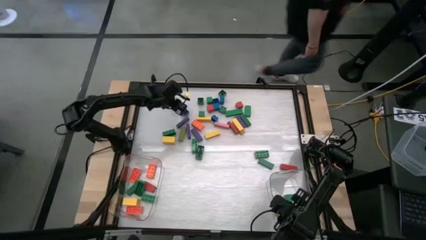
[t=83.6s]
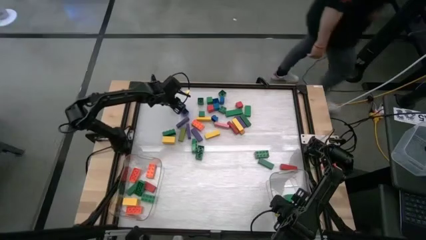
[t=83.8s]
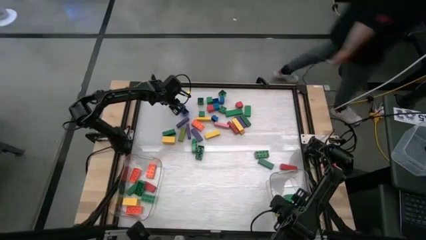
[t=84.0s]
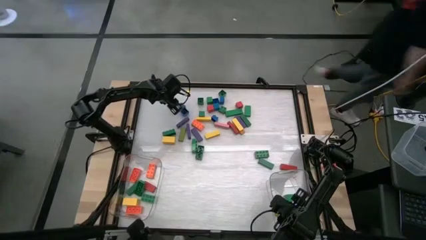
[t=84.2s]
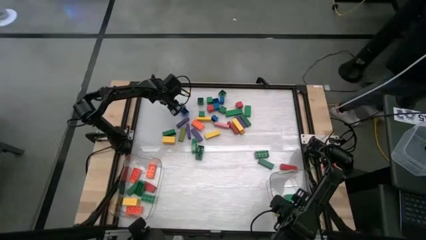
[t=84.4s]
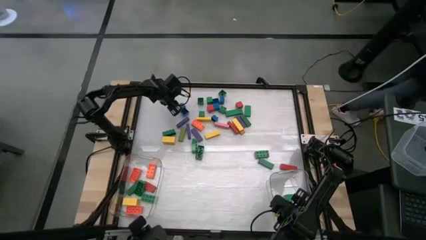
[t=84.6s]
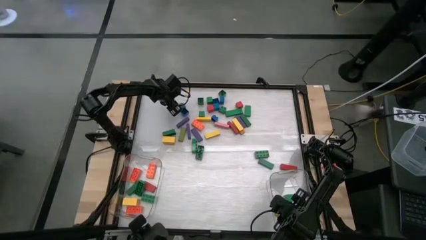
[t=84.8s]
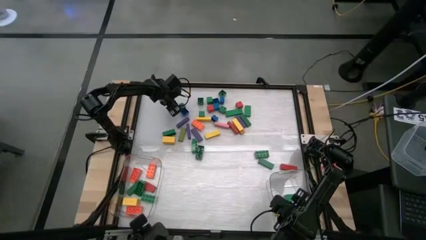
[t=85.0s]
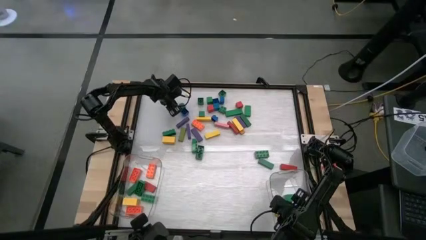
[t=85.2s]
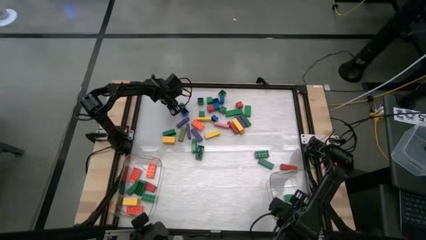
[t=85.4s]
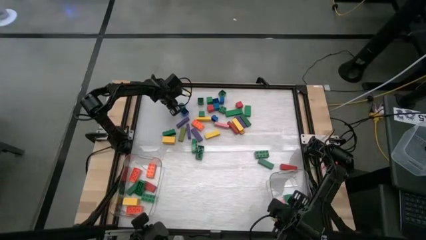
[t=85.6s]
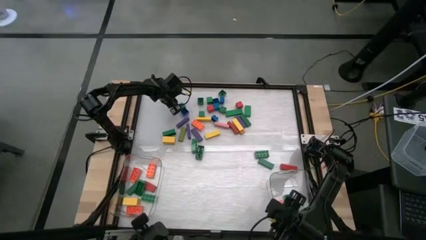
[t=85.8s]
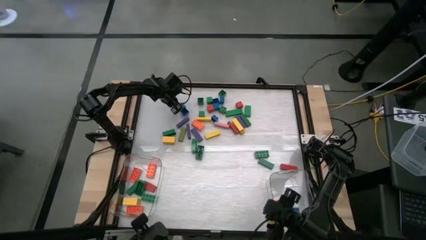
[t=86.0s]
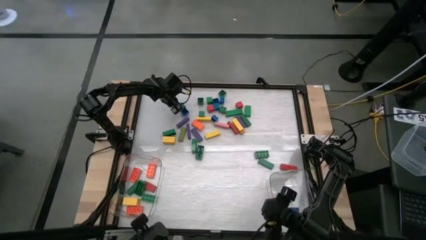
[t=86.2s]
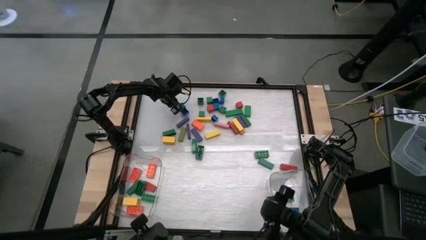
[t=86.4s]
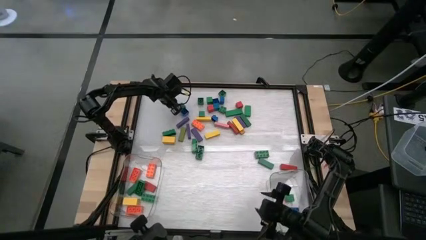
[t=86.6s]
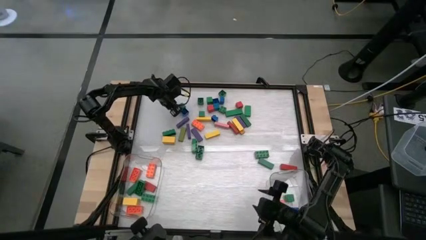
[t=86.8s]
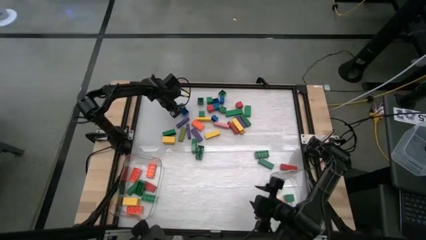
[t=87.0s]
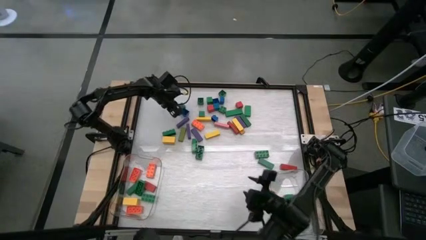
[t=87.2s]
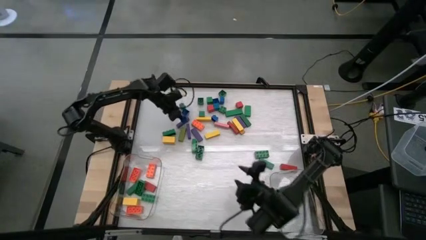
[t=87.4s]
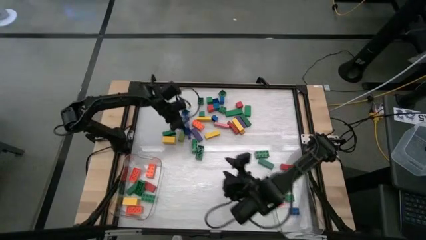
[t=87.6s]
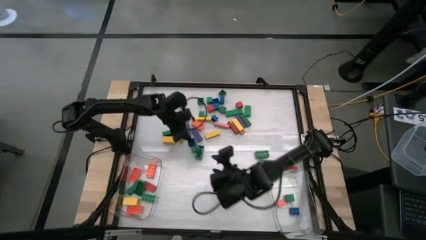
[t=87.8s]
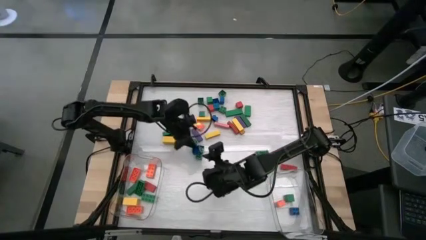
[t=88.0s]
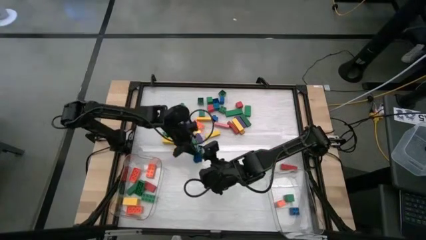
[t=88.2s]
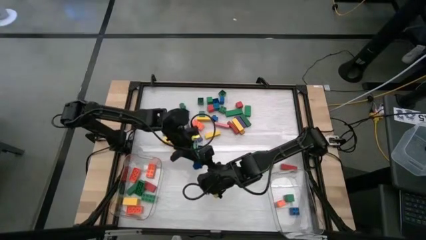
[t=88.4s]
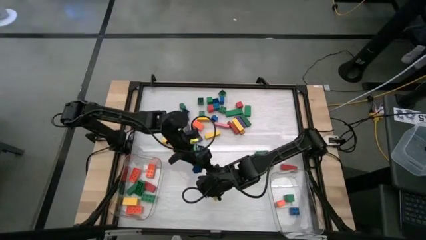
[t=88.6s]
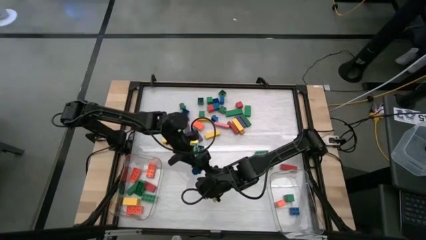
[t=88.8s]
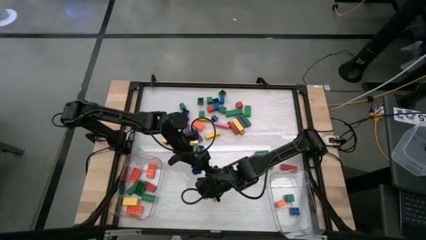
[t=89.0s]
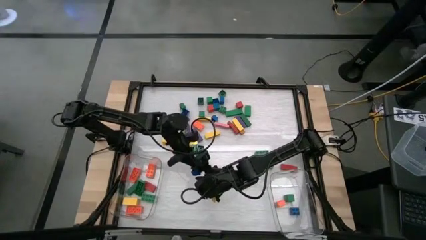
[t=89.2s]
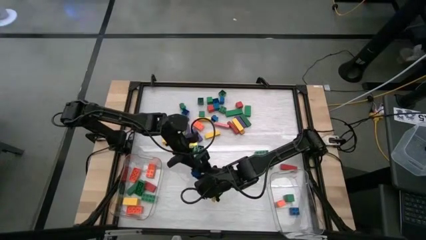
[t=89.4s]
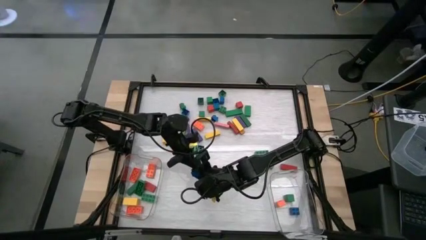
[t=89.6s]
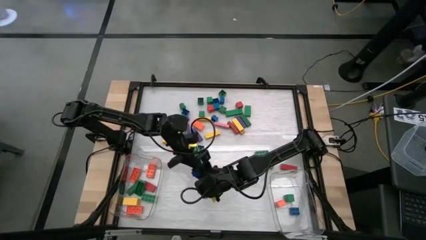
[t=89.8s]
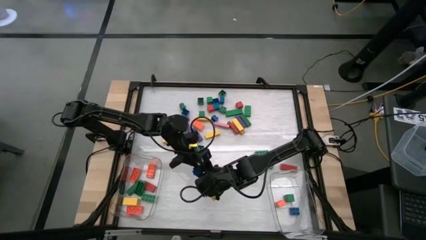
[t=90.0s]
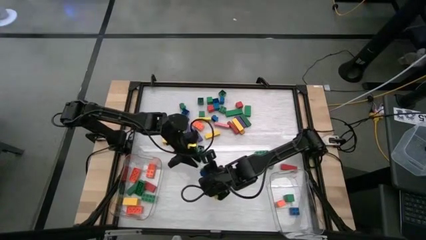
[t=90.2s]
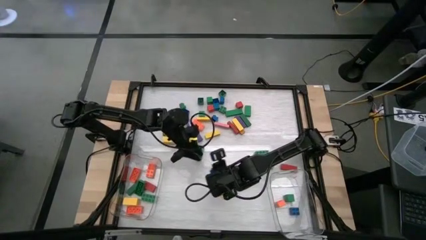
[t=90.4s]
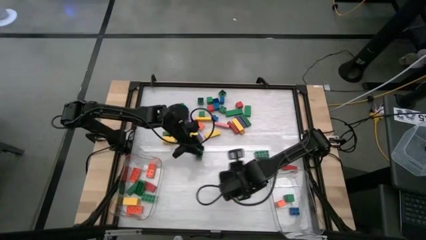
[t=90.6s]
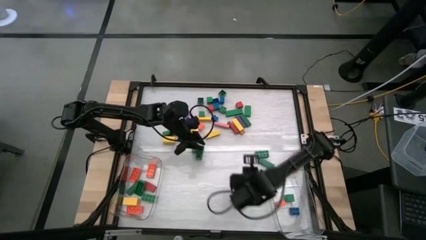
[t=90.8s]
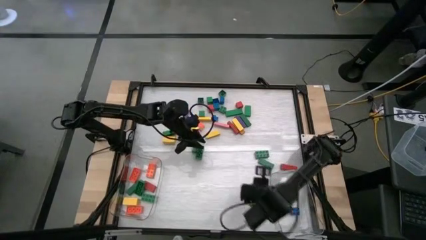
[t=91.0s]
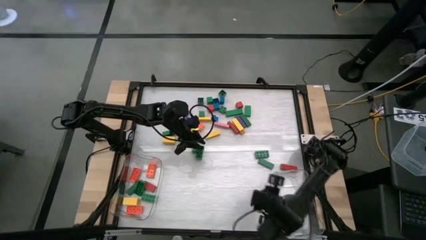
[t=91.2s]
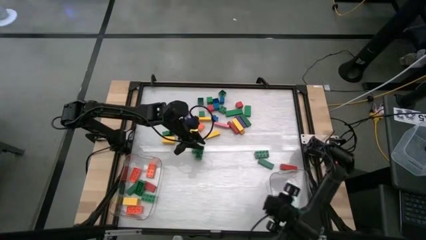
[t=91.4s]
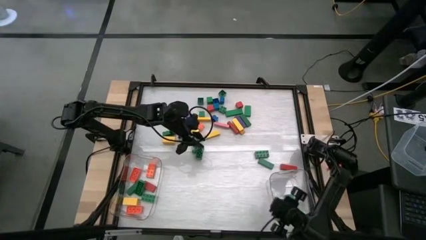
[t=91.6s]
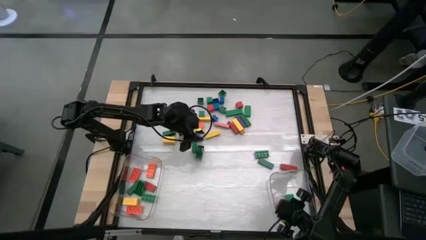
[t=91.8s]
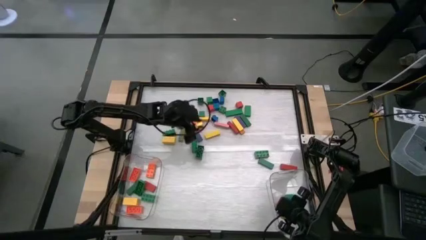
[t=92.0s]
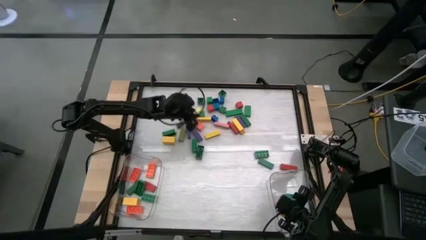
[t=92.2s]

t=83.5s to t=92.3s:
Task: Sort blocks by size
Put the small blue game piece into the right transparent bin

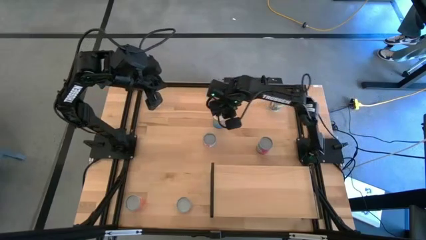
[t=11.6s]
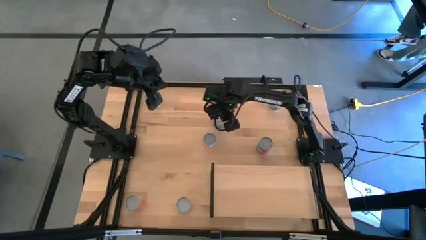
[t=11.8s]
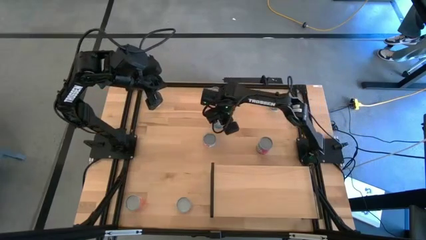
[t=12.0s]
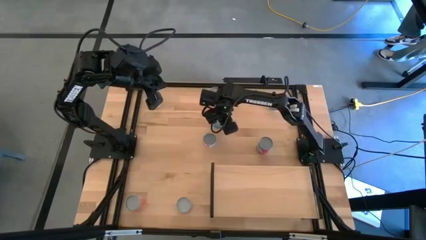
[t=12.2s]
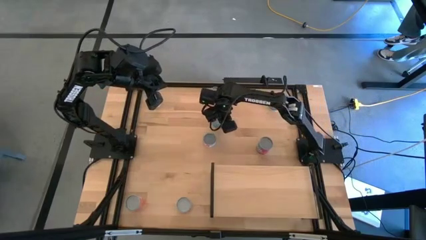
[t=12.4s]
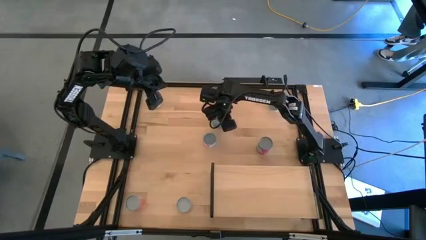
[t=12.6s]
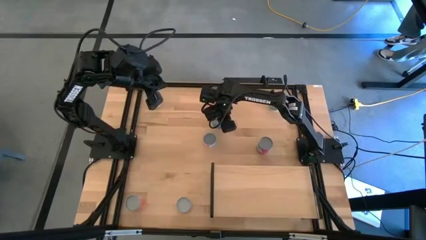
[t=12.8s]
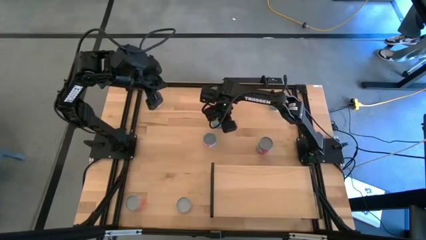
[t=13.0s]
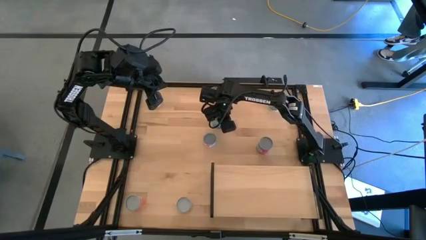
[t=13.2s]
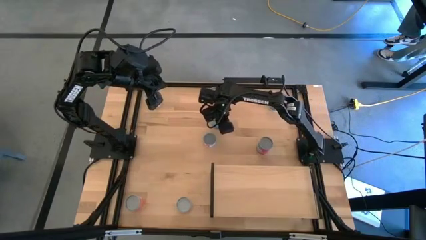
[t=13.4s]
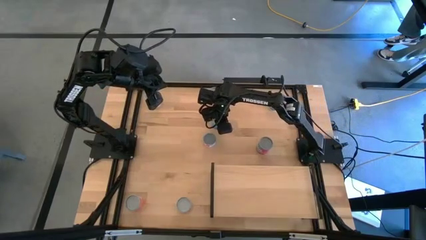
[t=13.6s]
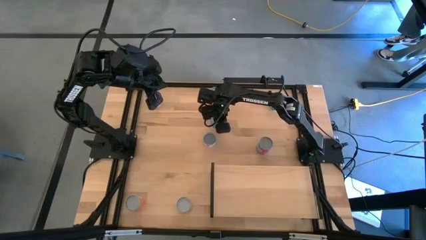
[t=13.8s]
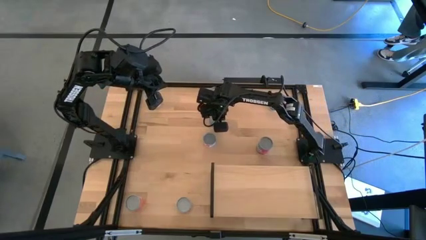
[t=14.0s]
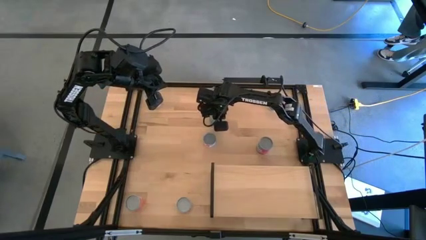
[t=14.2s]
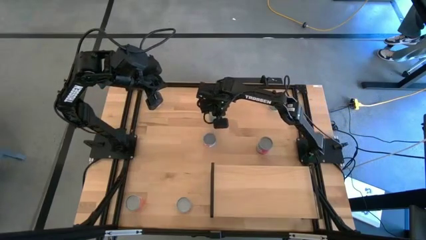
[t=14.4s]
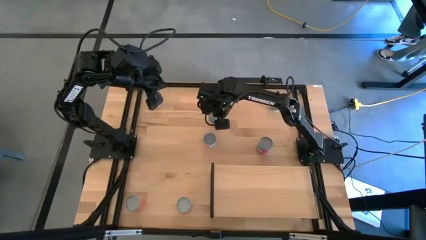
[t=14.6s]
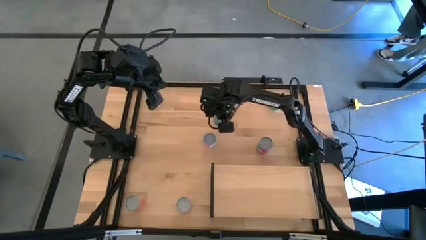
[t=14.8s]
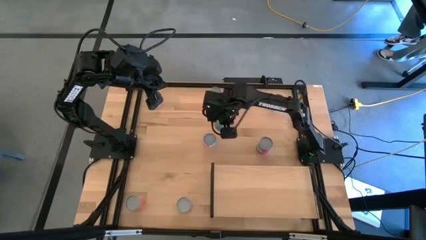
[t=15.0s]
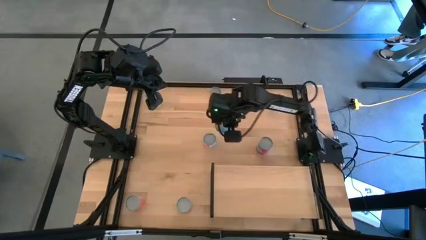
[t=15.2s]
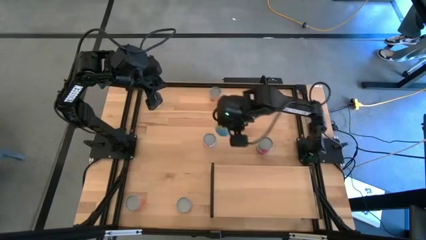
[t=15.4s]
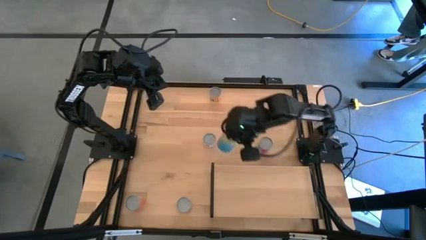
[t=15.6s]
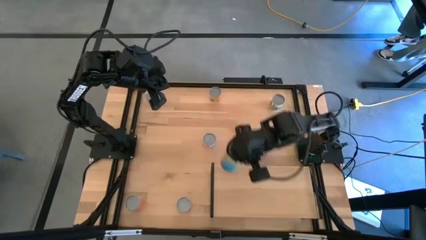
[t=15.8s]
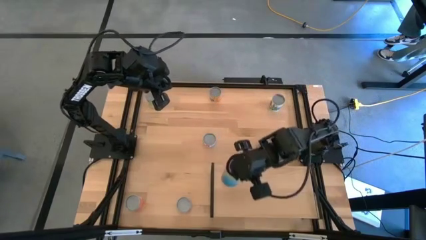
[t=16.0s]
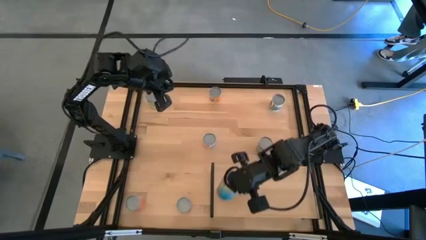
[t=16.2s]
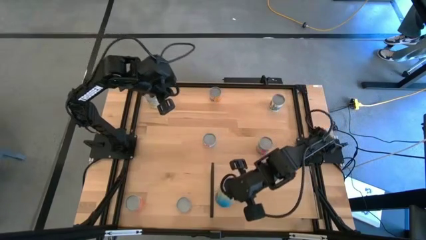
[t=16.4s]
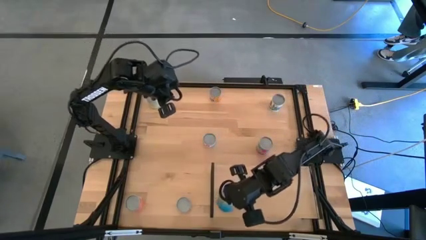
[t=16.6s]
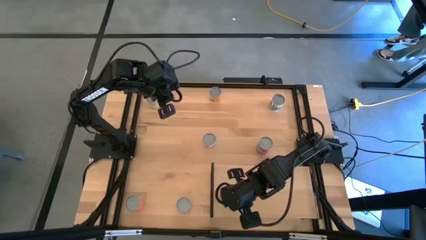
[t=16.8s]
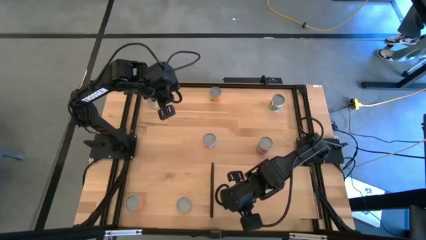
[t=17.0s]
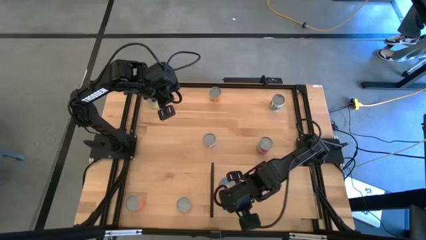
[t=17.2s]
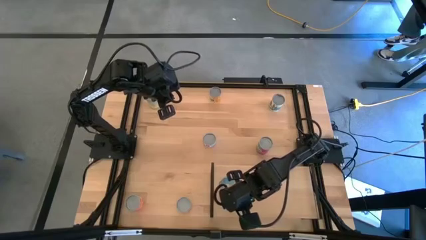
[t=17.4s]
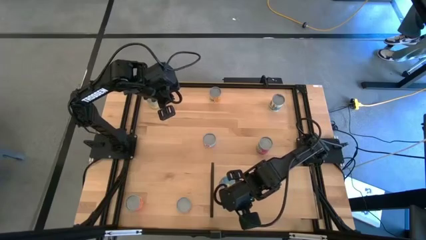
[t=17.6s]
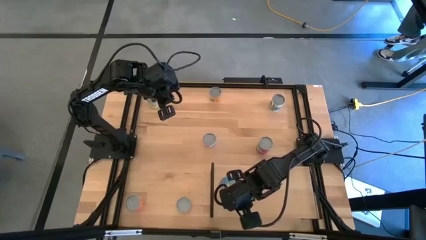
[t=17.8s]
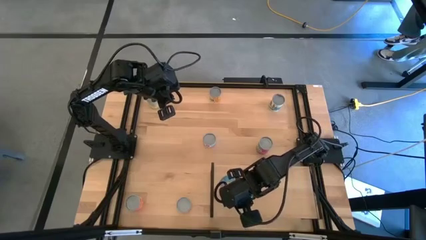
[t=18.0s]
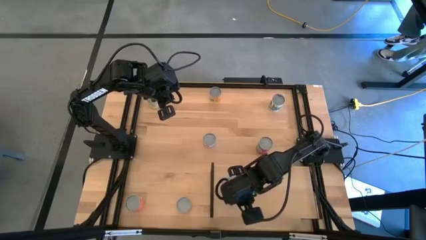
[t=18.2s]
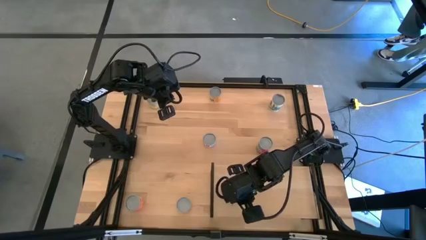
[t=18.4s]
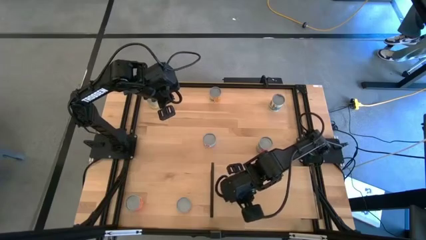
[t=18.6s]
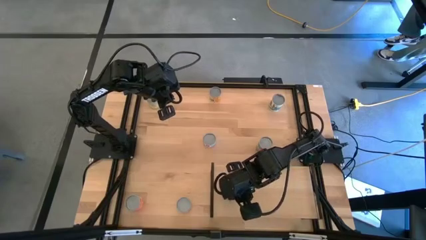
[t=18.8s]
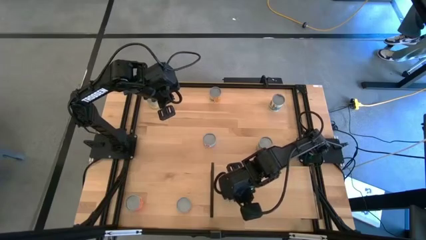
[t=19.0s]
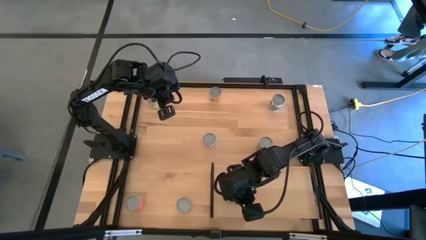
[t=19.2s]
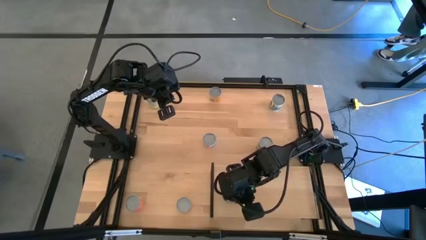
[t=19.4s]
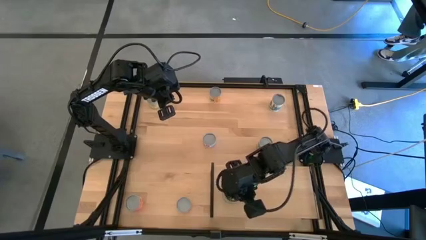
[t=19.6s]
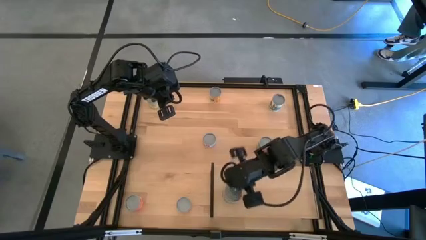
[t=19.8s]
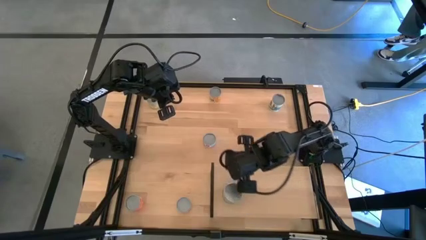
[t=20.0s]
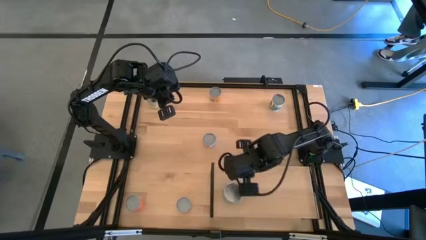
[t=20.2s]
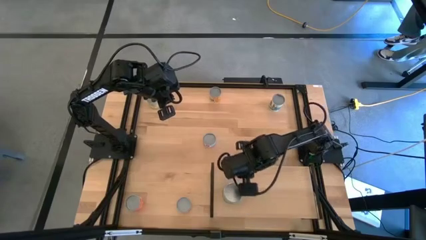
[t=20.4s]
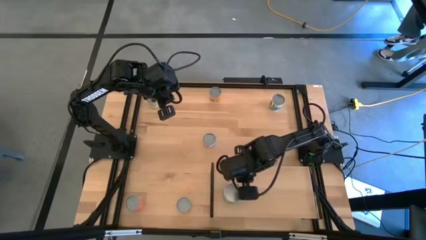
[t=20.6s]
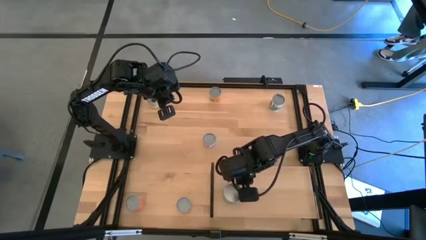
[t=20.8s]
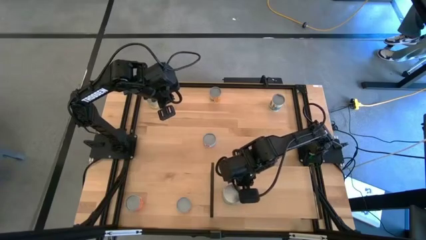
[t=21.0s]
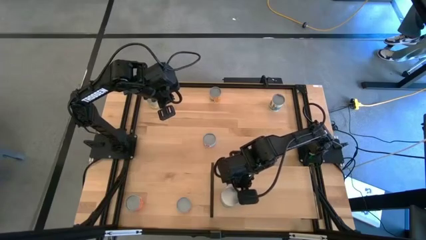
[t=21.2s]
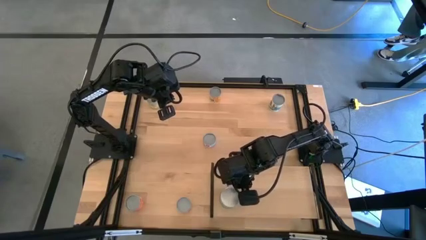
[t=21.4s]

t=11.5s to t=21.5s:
Task: Pick and place cans onto a shelf
Put the canned cherries on the shelf
